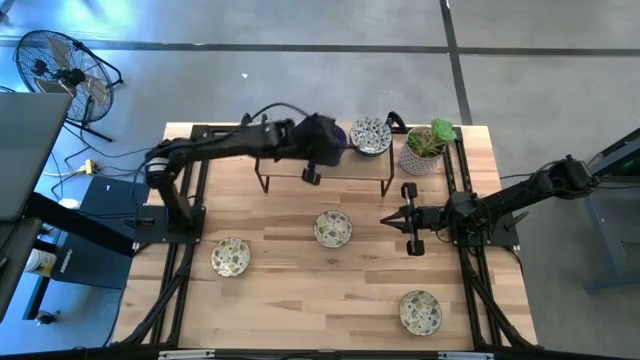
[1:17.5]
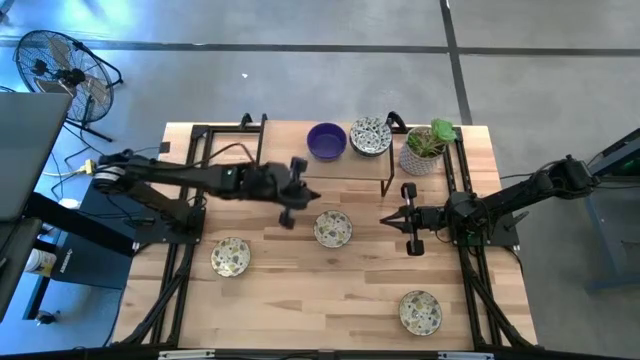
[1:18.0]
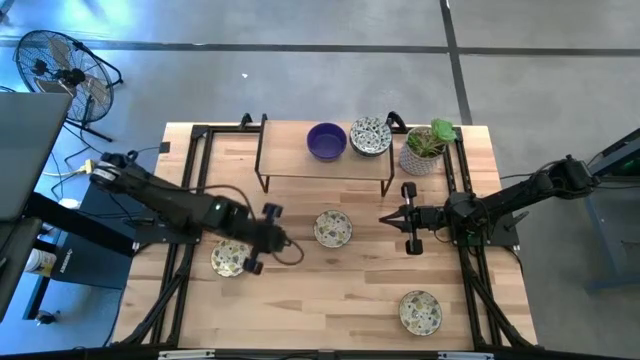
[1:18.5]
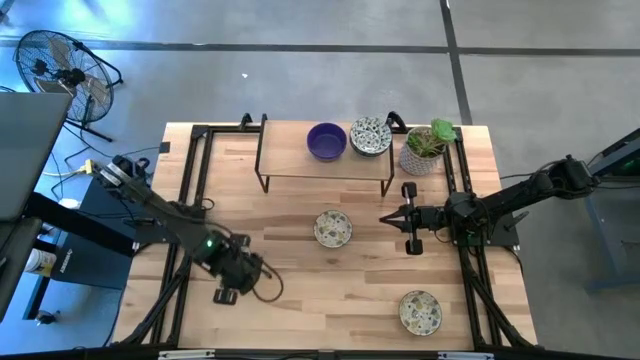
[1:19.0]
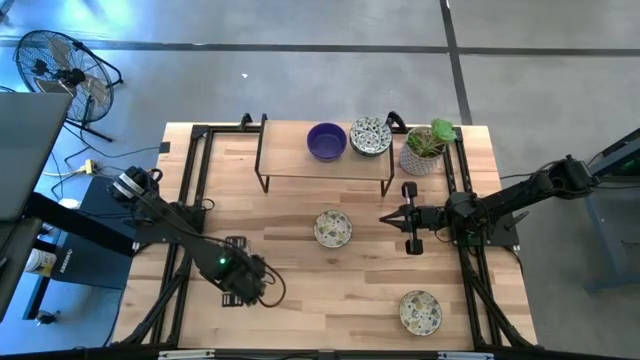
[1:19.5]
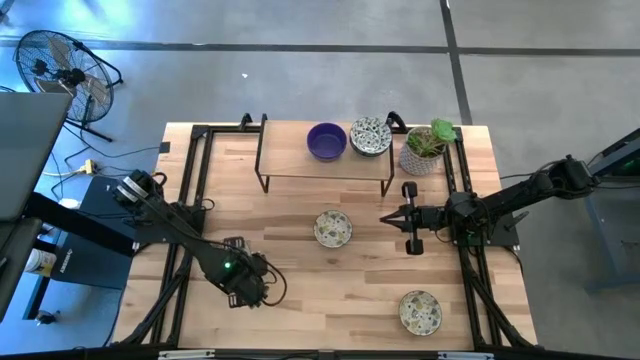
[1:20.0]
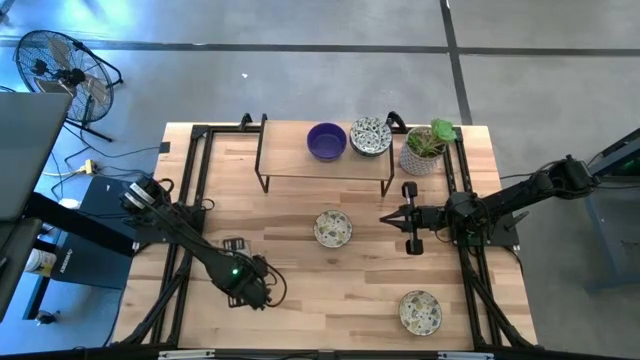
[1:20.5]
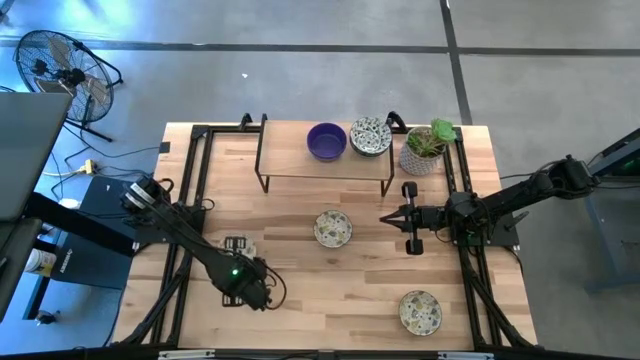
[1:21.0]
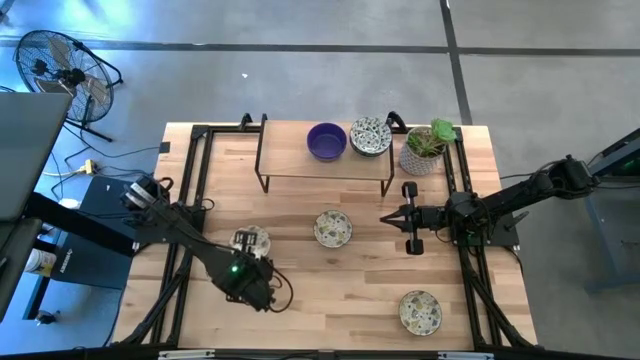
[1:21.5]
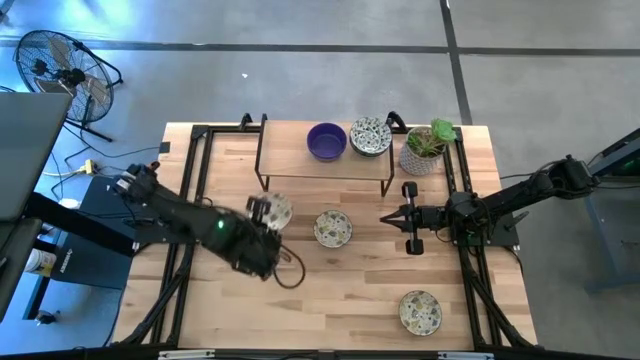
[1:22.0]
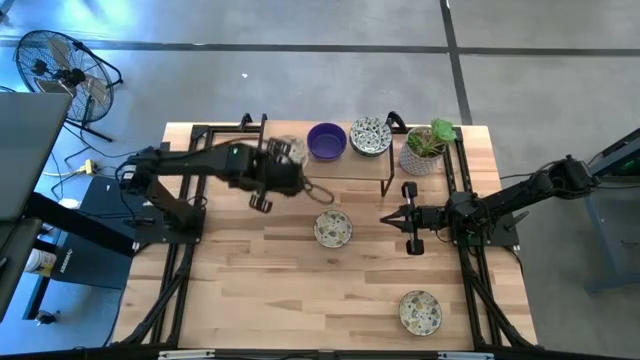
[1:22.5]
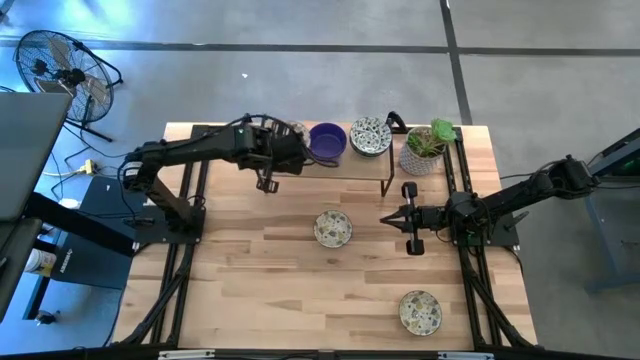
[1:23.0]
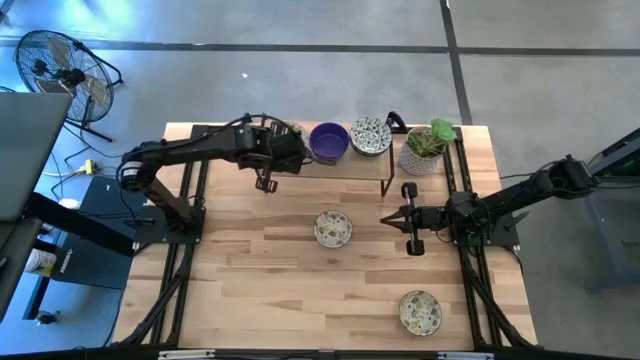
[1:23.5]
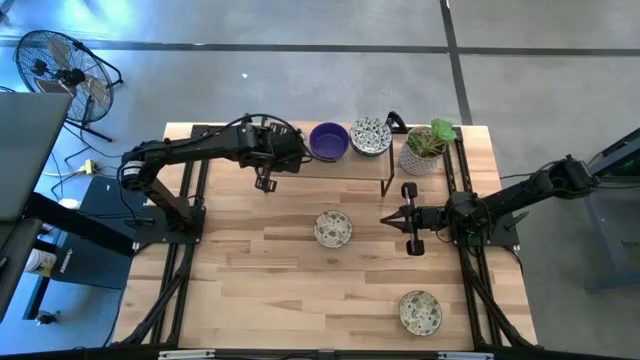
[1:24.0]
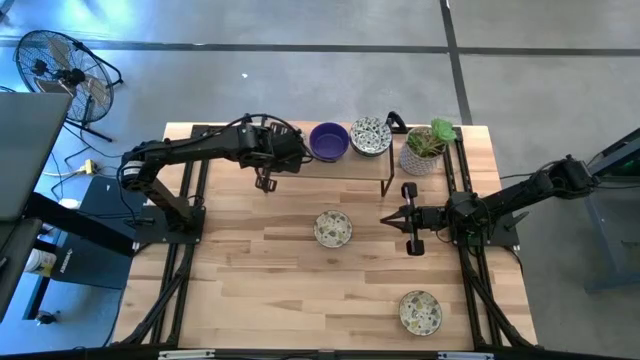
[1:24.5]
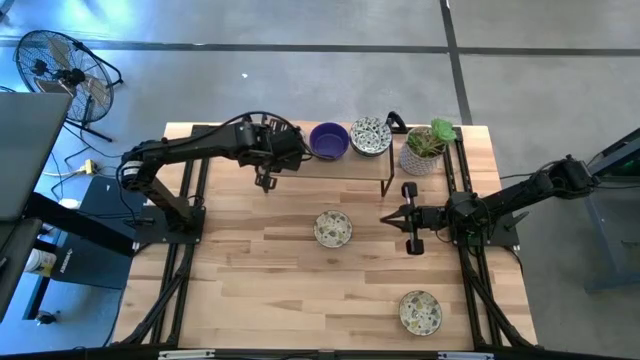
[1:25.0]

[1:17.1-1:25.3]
Task: Pick & Place Mini bowls
Put the top yellow patterned bowl on the shelf

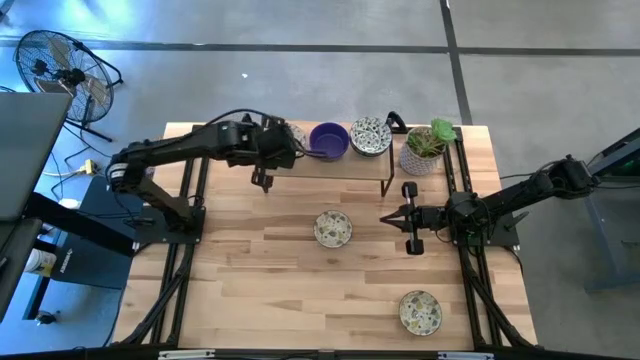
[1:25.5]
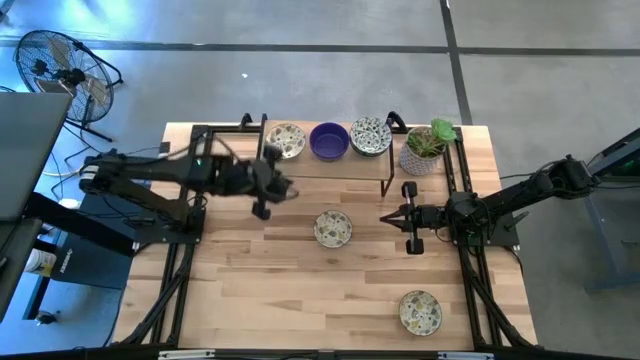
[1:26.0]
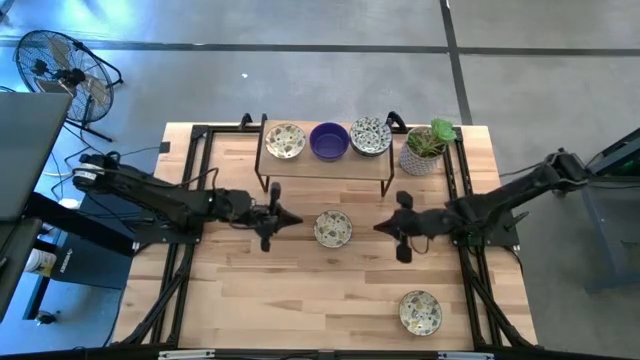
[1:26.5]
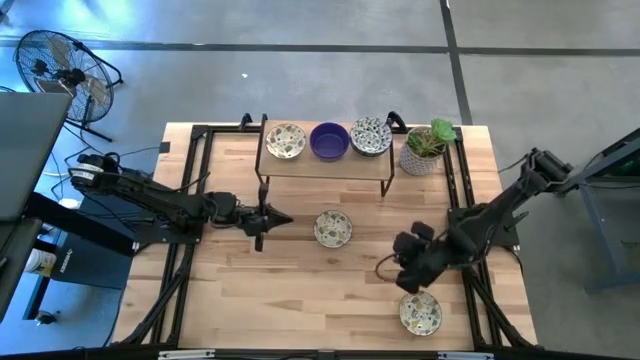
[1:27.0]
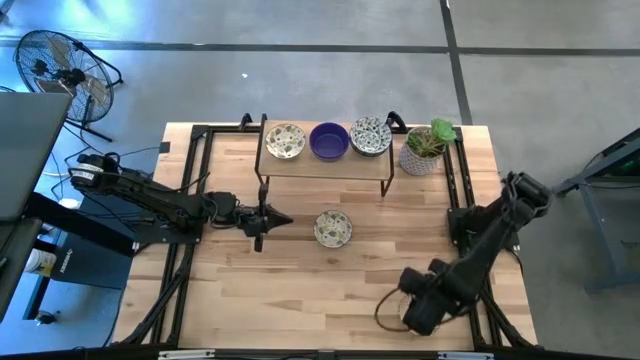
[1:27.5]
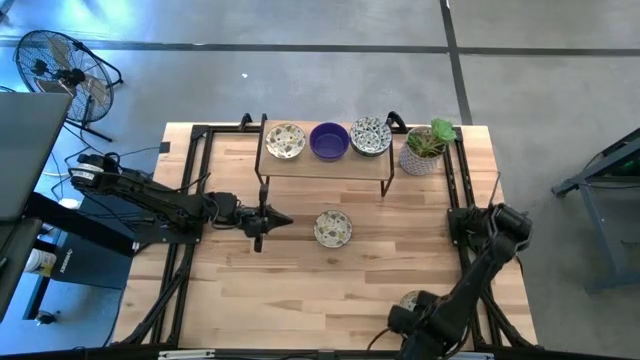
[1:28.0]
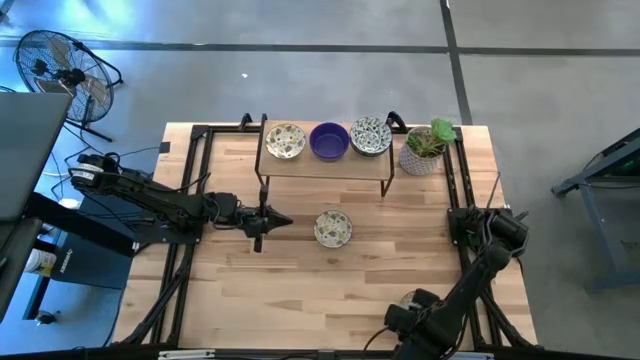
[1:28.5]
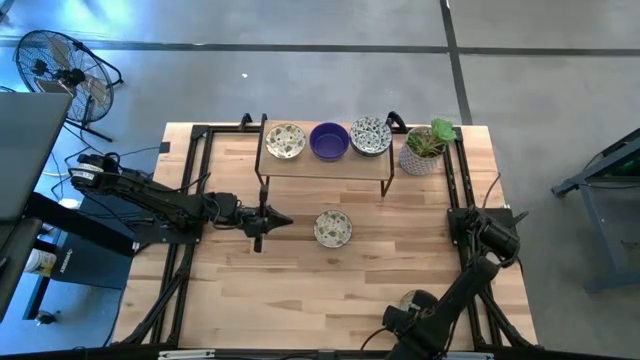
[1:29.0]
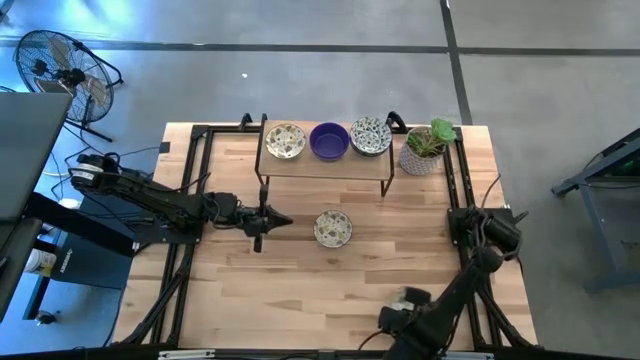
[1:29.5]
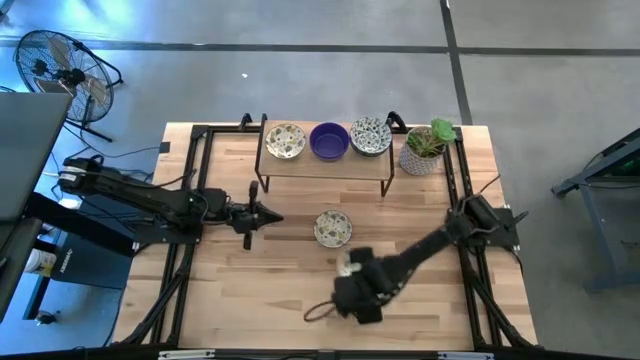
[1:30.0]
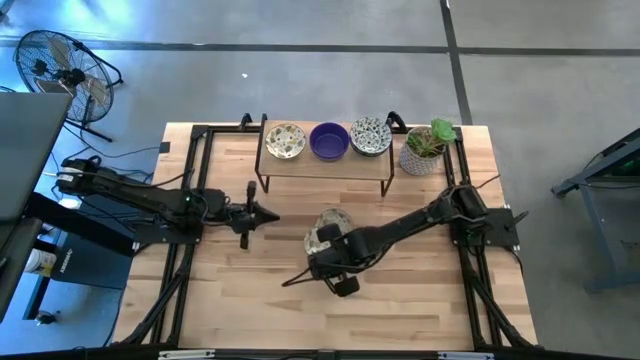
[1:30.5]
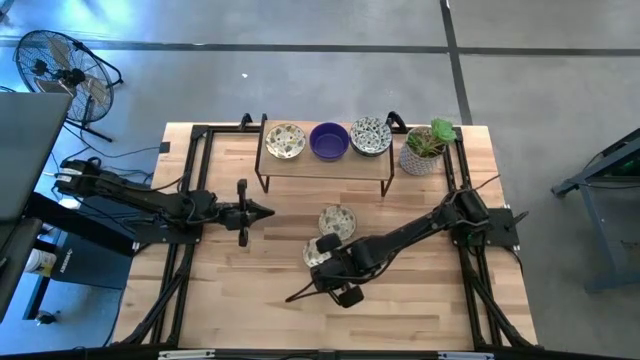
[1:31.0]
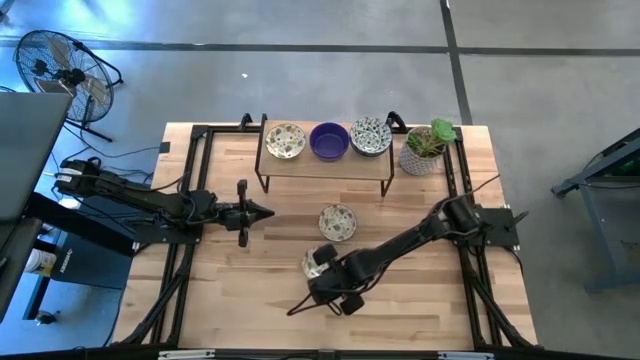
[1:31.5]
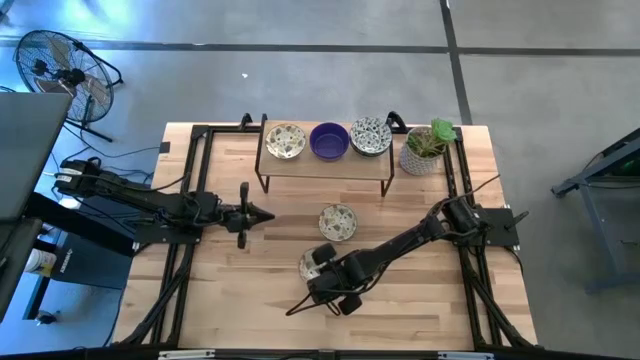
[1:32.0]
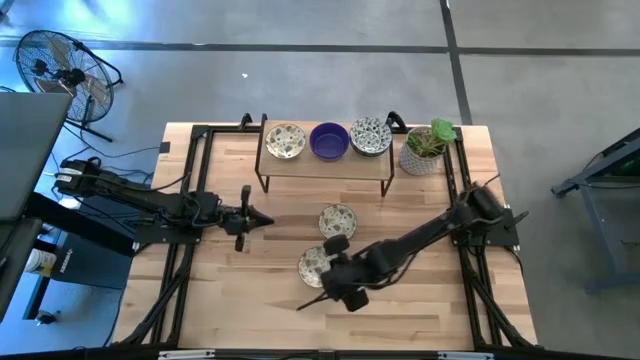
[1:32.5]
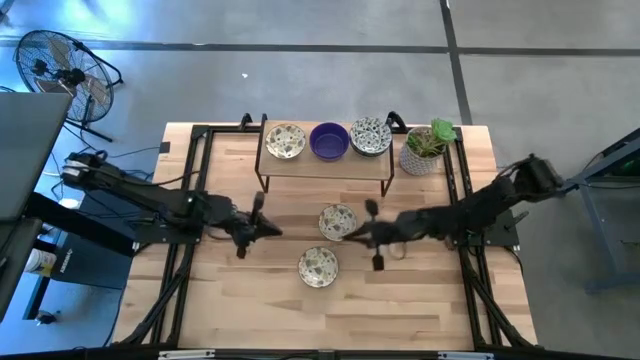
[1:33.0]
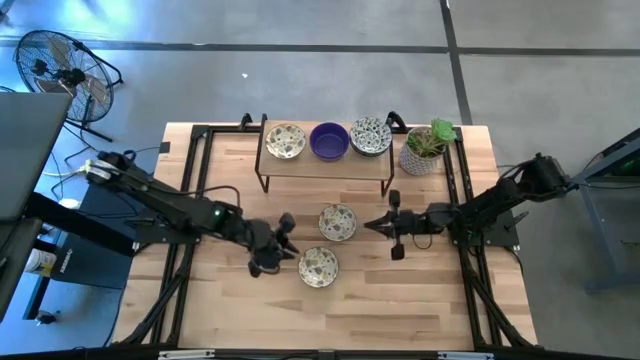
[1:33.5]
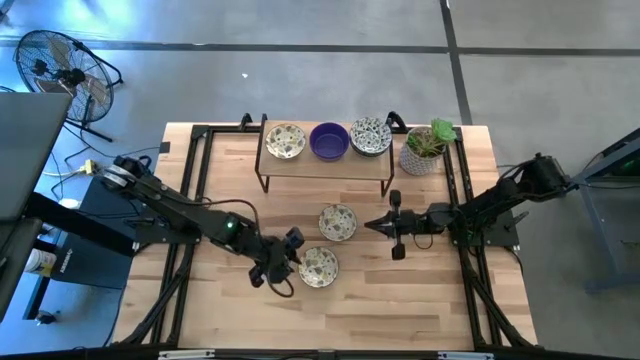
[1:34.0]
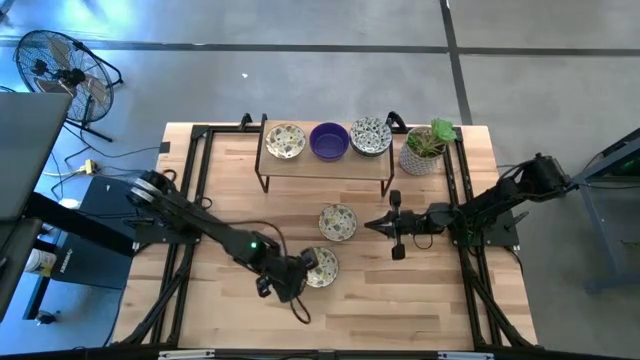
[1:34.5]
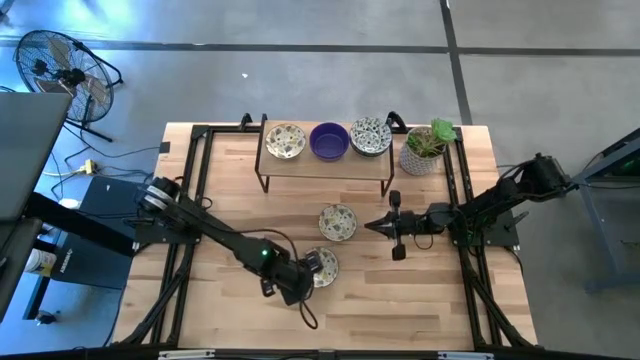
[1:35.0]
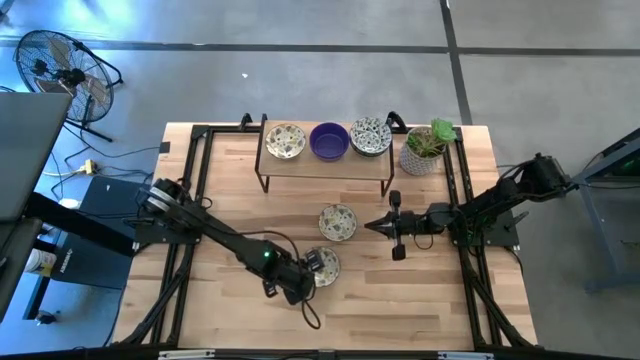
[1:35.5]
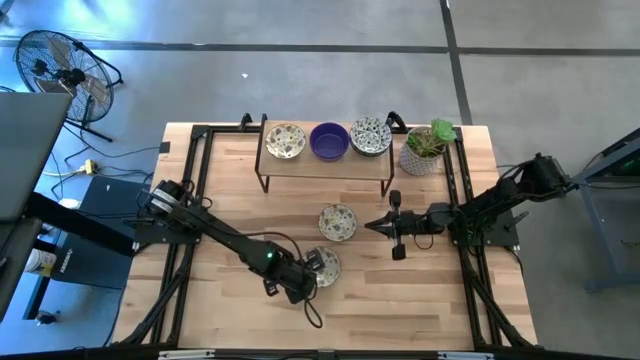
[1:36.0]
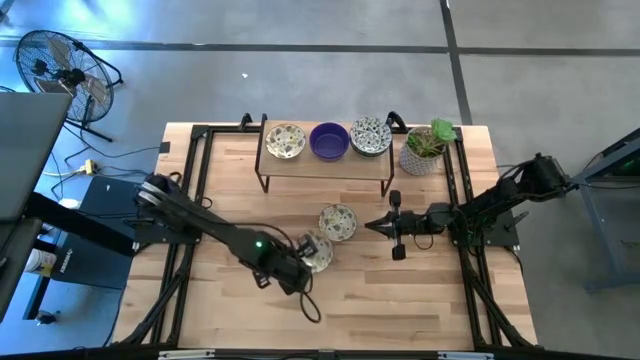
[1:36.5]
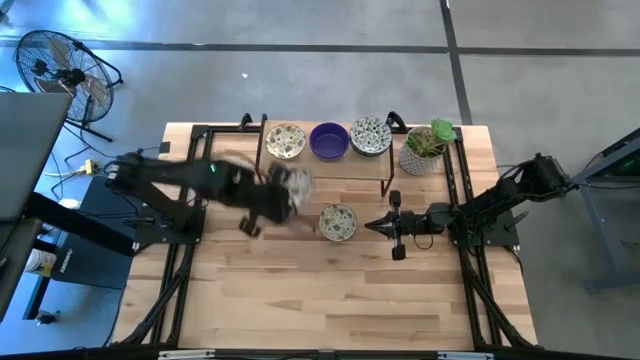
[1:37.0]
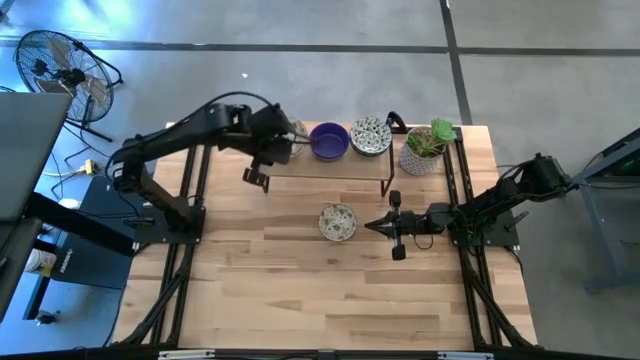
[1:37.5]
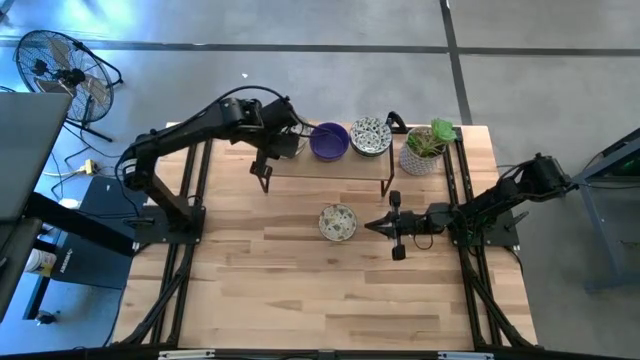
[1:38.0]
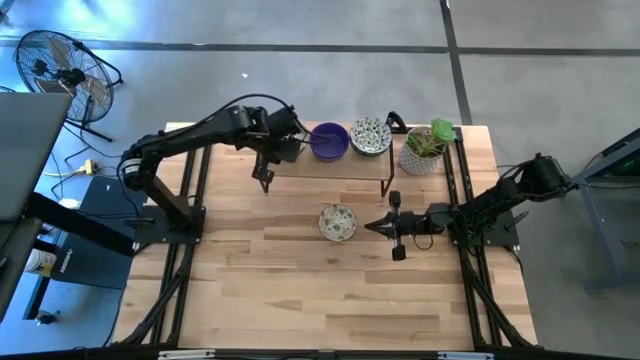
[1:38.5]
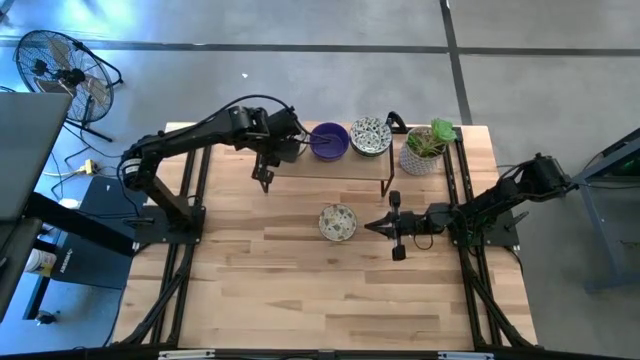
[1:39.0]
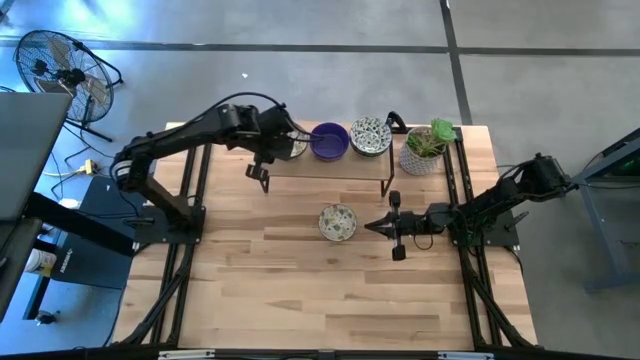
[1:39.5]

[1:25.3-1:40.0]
Stack the bottom yellow patterned bowl on top of the yellow patterned bowl on the shelf
